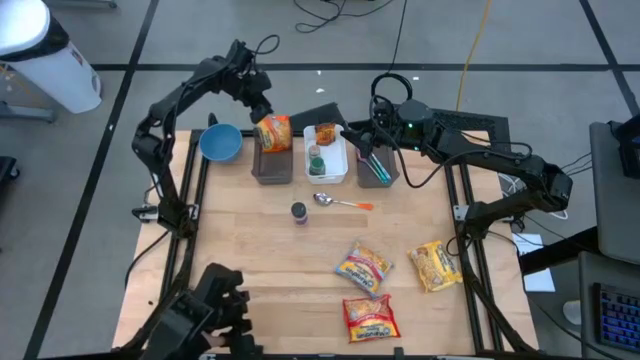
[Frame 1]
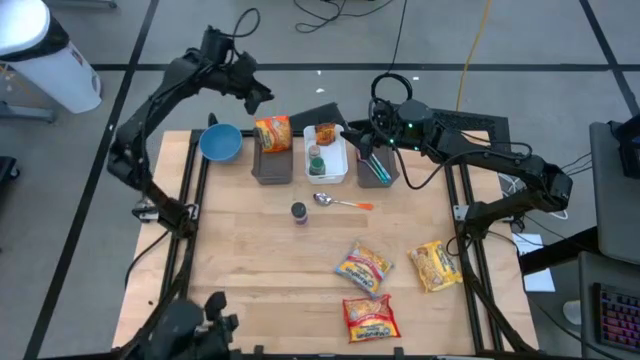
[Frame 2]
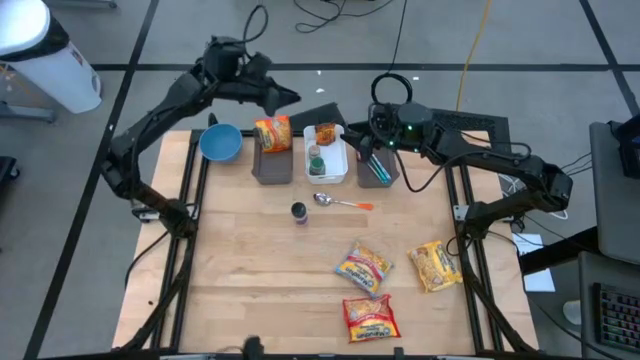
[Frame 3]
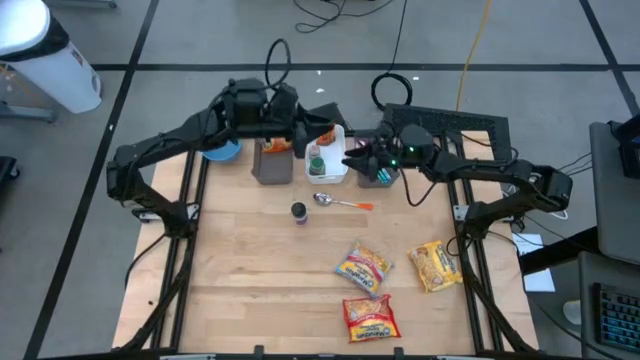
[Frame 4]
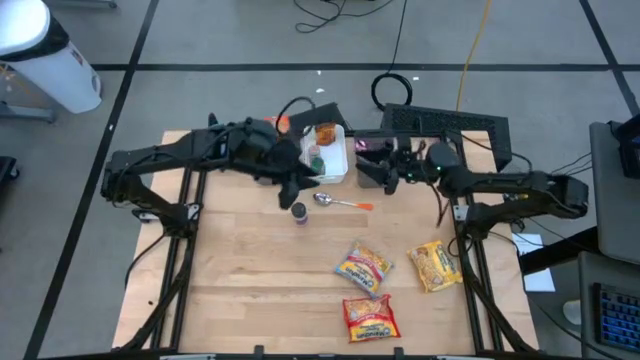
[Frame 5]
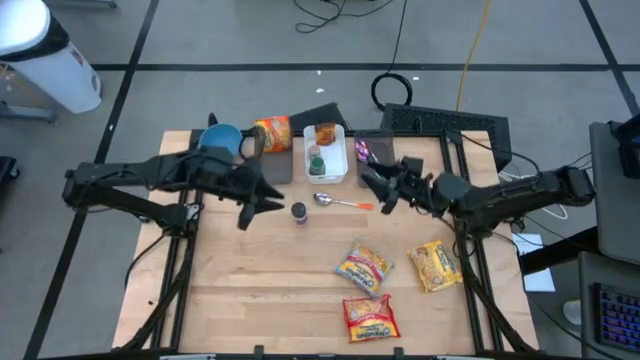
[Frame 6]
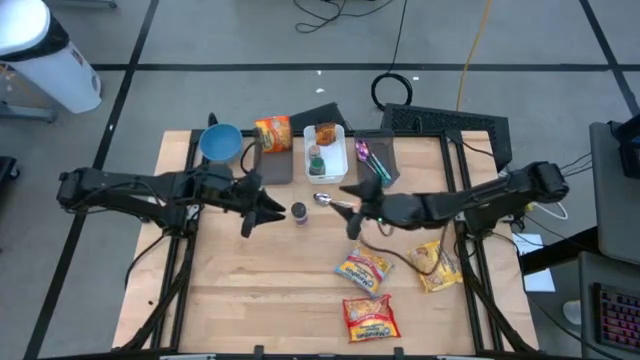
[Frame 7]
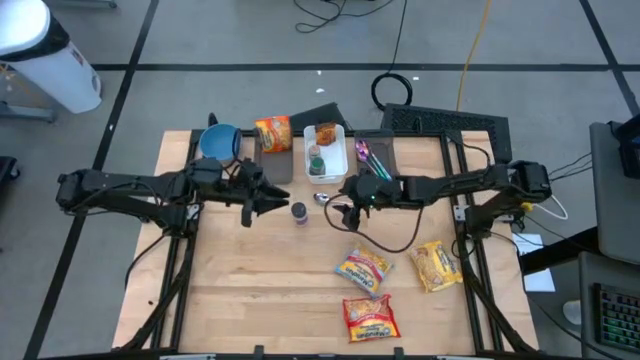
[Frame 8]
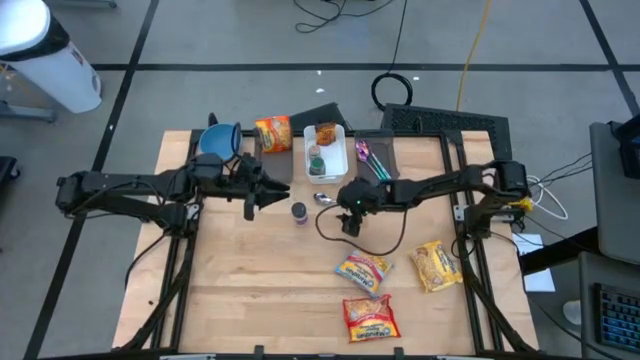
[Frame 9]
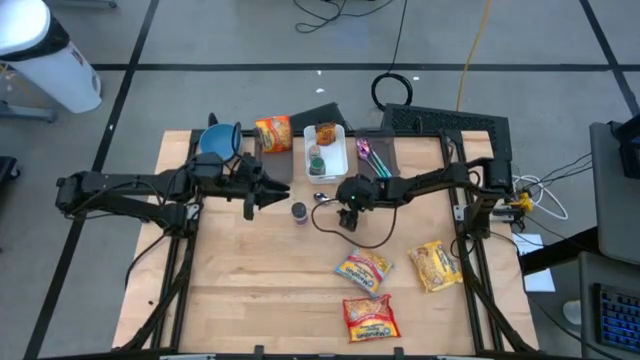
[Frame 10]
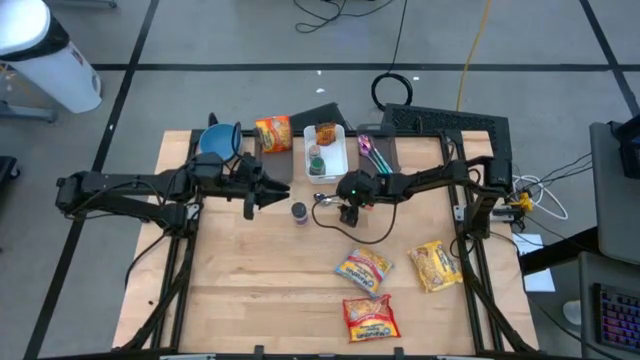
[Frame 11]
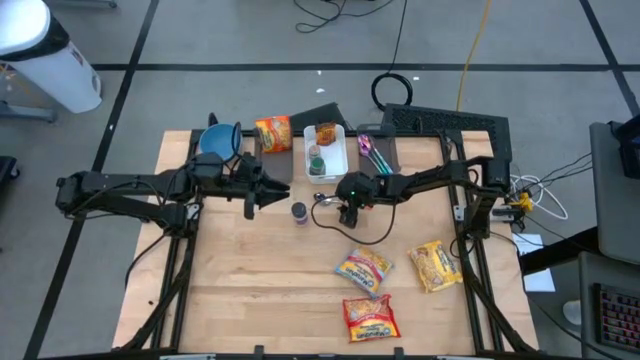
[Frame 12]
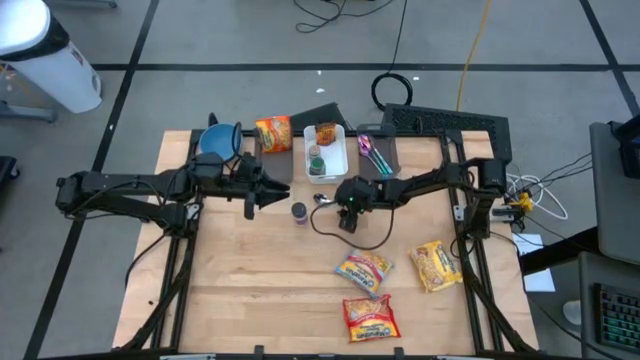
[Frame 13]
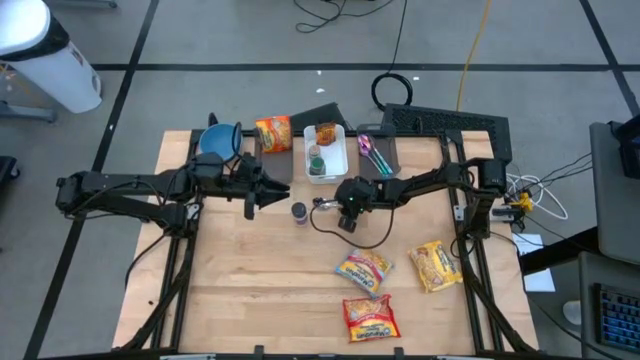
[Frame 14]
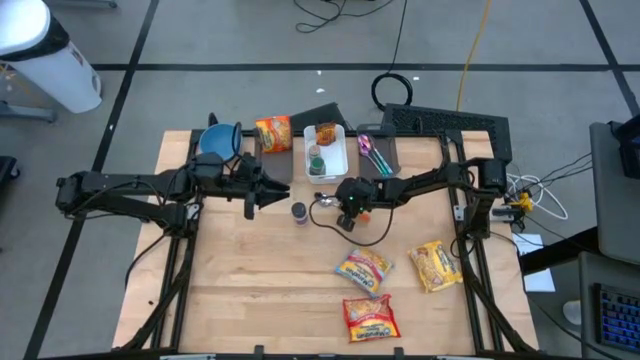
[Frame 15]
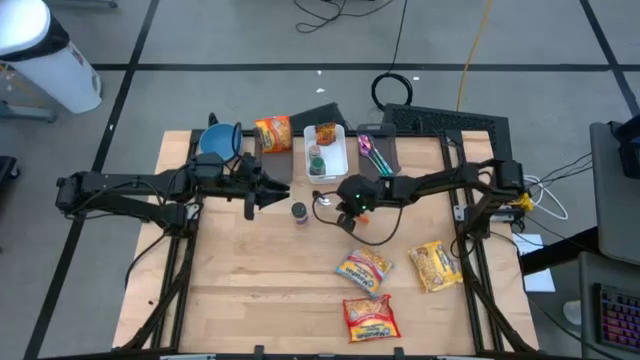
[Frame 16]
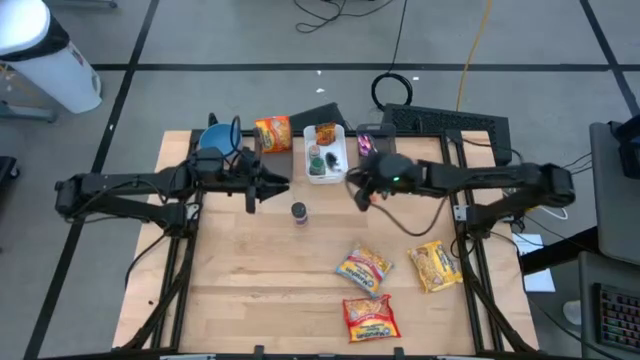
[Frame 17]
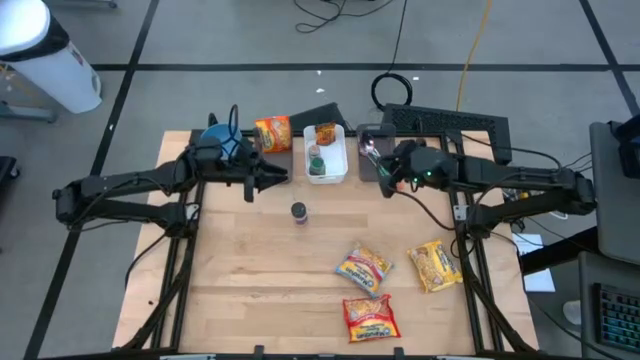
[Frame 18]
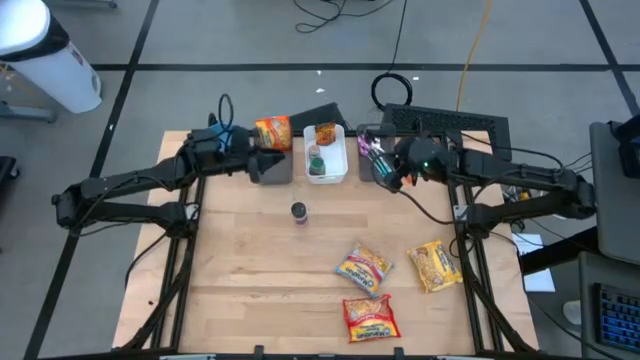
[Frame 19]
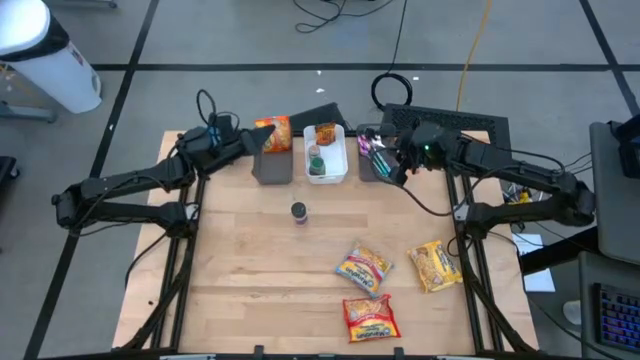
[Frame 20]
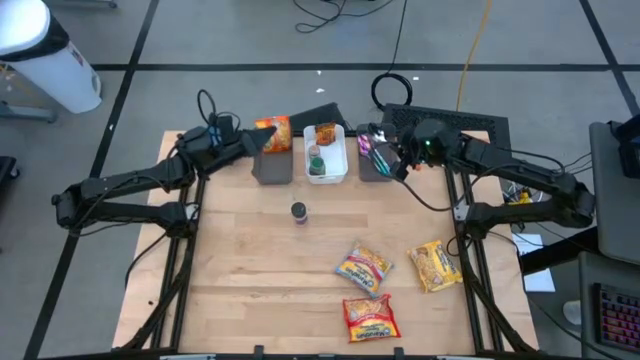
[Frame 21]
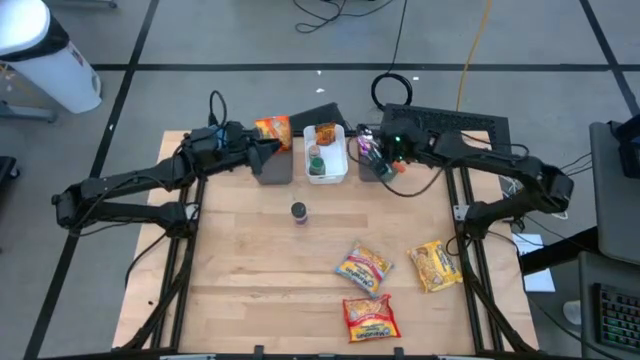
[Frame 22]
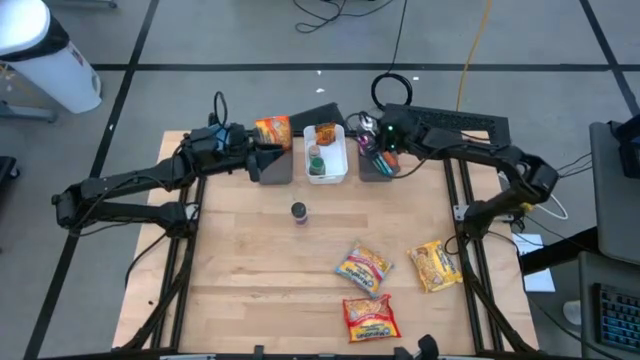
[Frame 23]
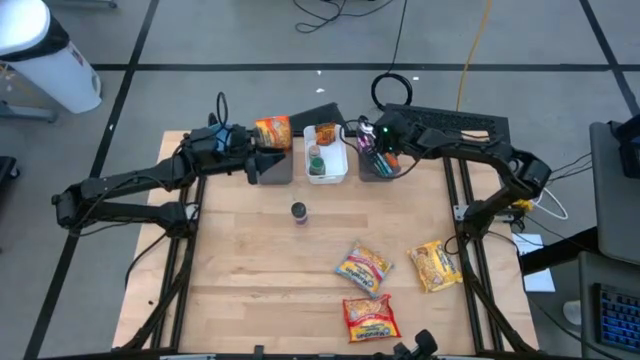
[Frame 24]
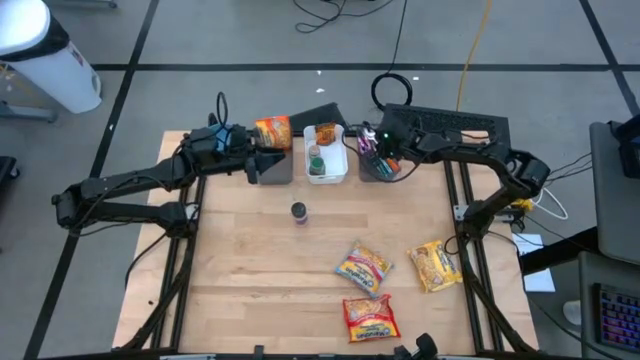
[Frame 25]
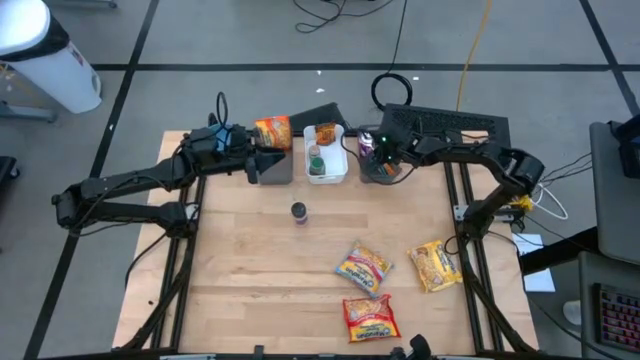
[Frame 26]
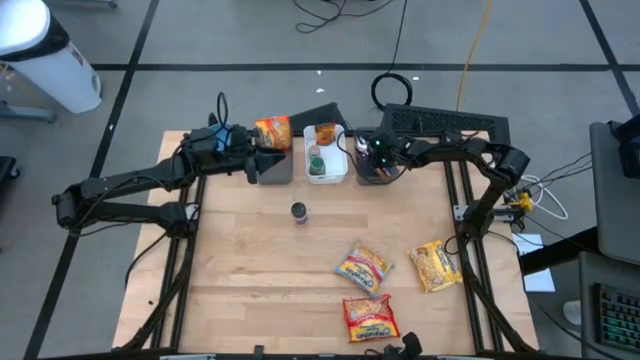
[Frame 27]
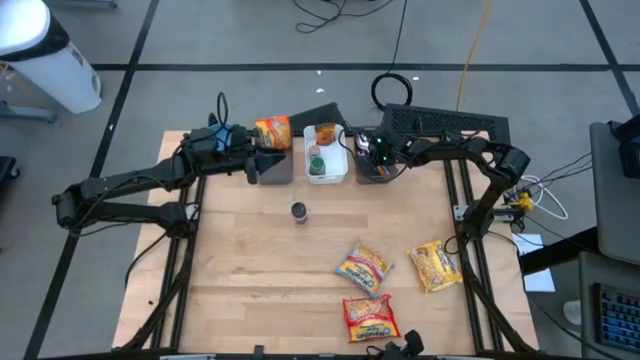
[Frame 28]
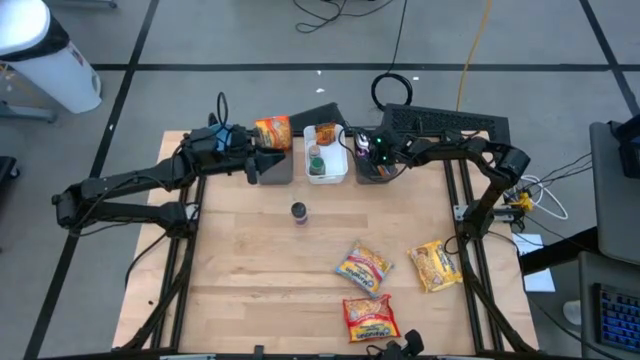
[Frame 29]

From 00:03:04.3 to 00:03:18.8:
Task: Pick & Place Food Item
Put the orange spoon into the right black bin
